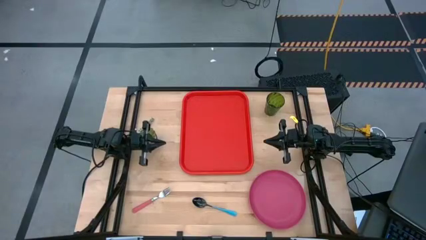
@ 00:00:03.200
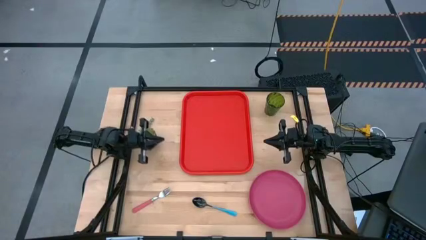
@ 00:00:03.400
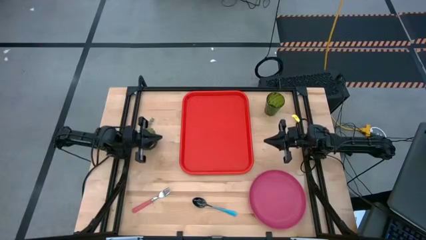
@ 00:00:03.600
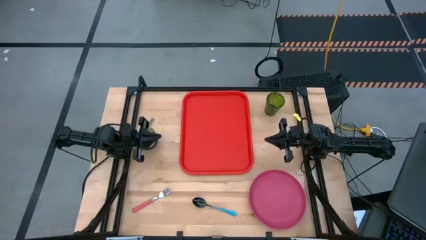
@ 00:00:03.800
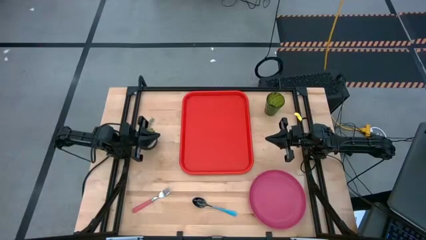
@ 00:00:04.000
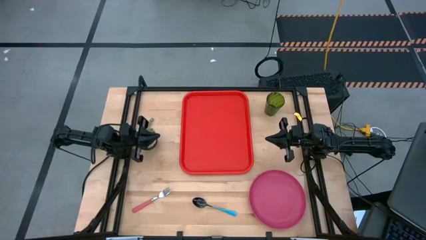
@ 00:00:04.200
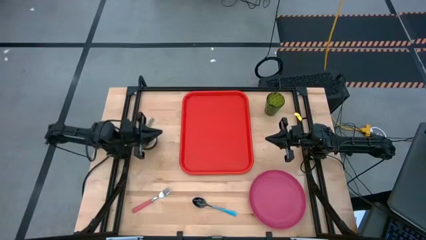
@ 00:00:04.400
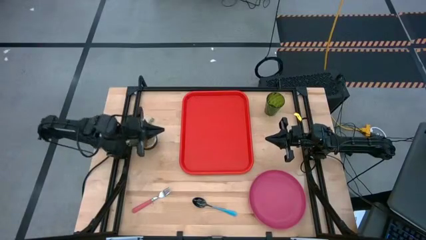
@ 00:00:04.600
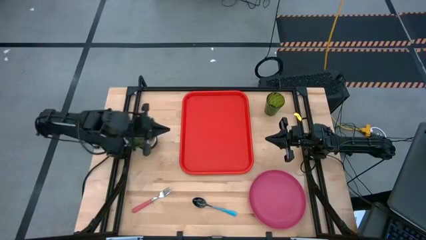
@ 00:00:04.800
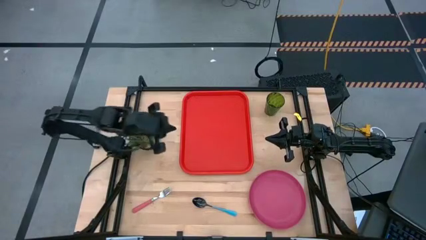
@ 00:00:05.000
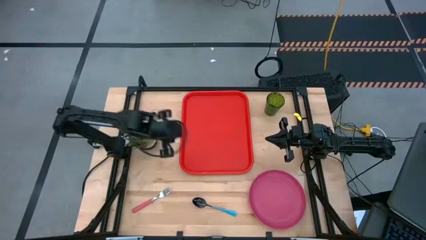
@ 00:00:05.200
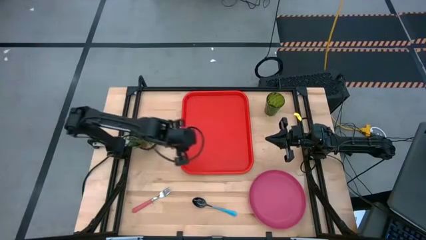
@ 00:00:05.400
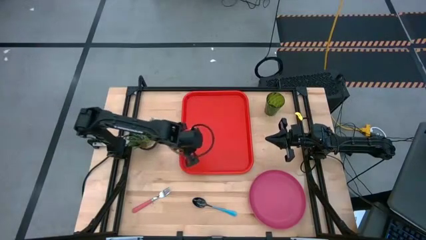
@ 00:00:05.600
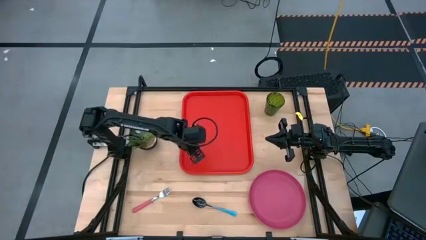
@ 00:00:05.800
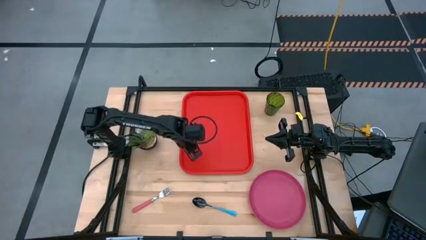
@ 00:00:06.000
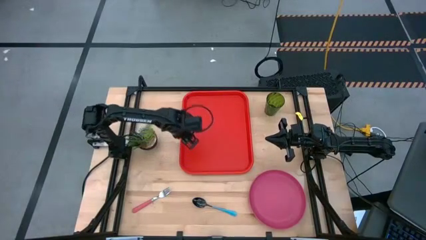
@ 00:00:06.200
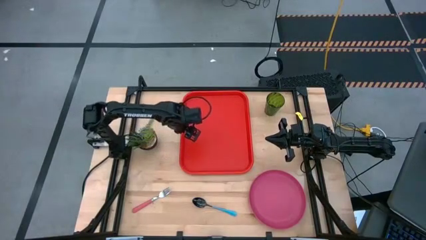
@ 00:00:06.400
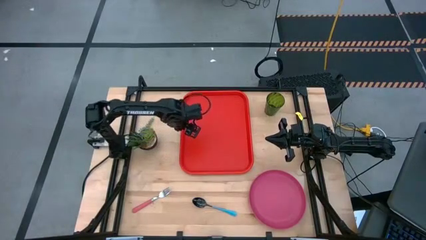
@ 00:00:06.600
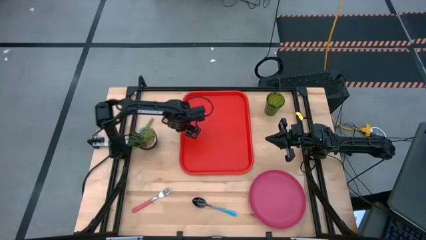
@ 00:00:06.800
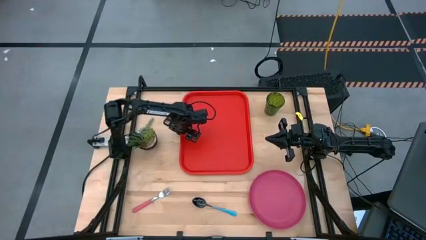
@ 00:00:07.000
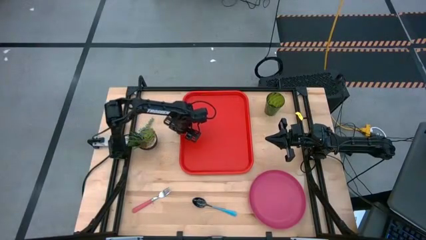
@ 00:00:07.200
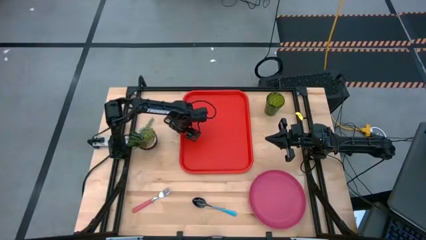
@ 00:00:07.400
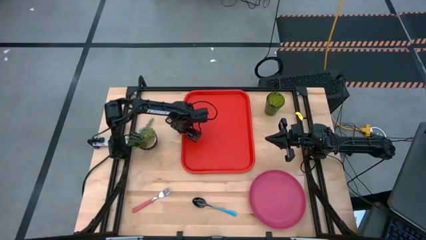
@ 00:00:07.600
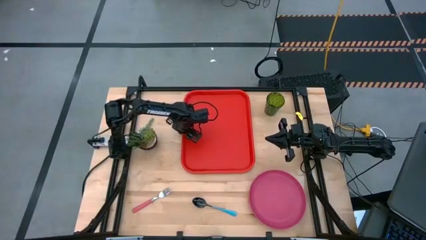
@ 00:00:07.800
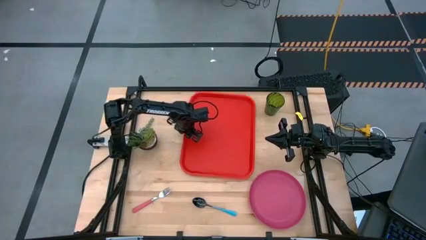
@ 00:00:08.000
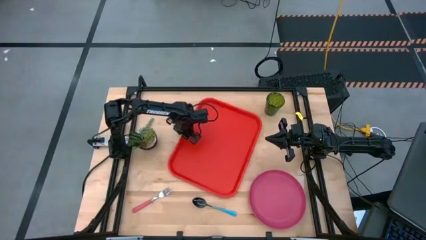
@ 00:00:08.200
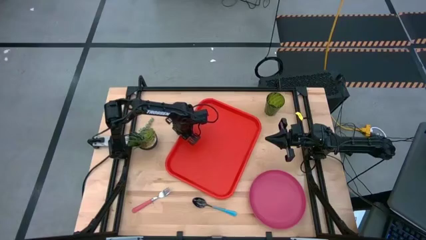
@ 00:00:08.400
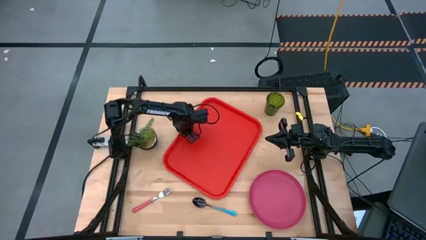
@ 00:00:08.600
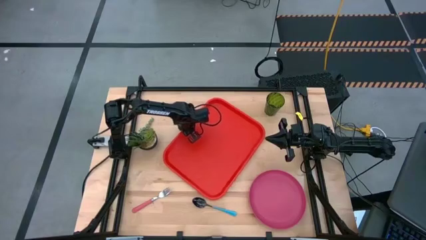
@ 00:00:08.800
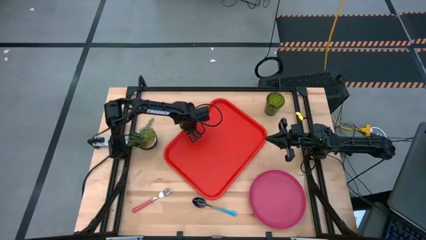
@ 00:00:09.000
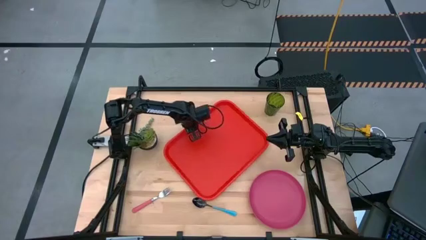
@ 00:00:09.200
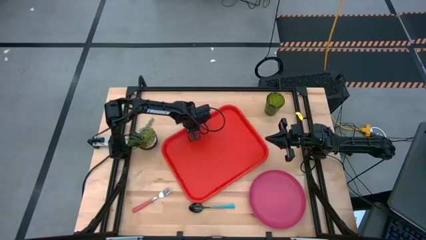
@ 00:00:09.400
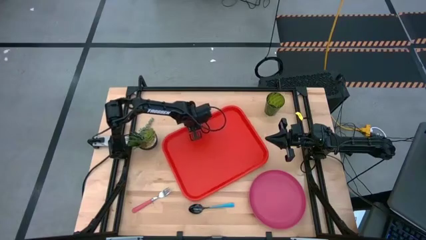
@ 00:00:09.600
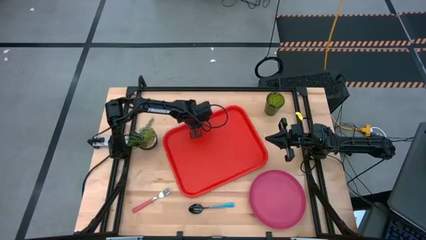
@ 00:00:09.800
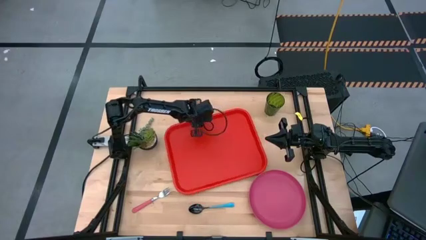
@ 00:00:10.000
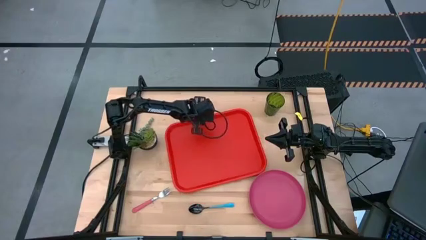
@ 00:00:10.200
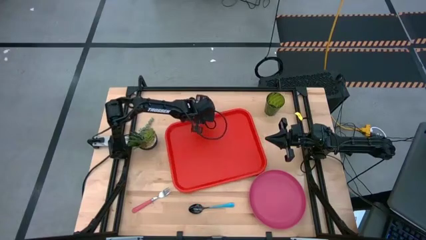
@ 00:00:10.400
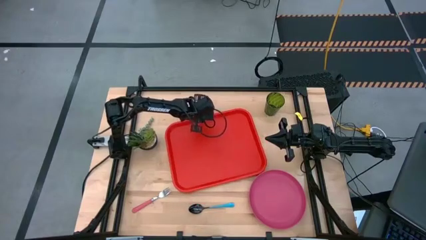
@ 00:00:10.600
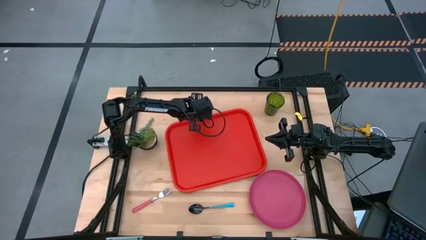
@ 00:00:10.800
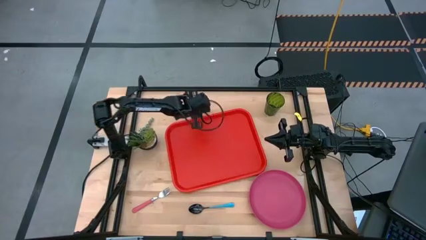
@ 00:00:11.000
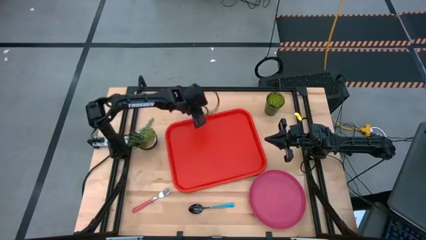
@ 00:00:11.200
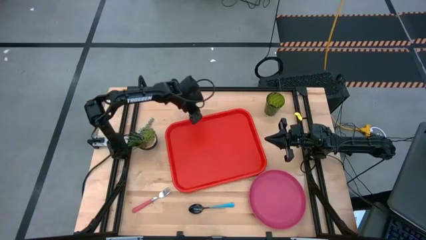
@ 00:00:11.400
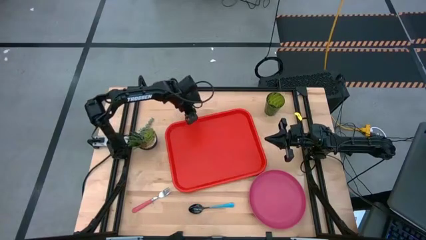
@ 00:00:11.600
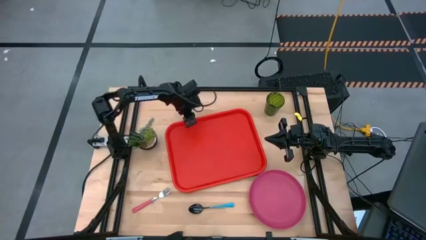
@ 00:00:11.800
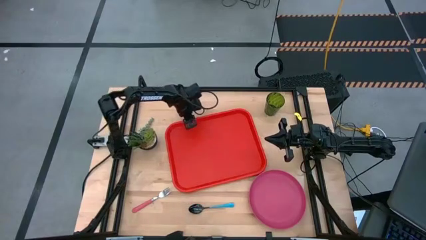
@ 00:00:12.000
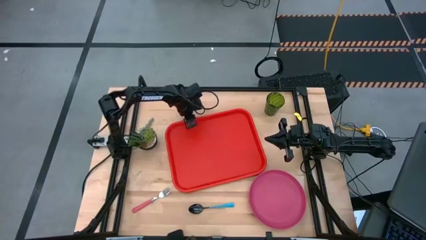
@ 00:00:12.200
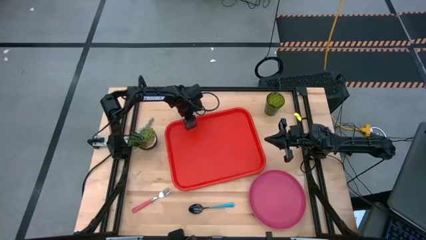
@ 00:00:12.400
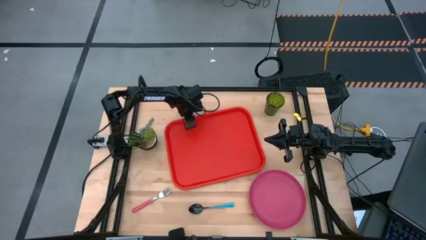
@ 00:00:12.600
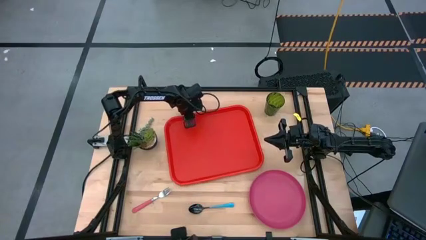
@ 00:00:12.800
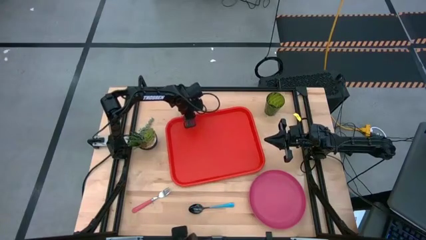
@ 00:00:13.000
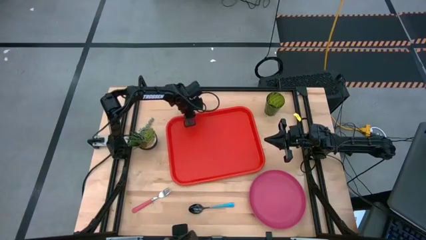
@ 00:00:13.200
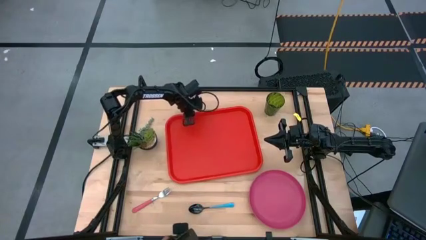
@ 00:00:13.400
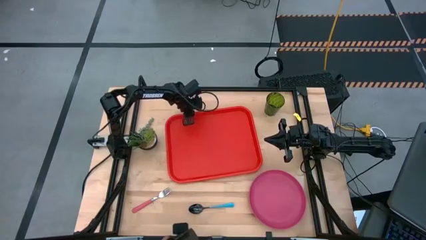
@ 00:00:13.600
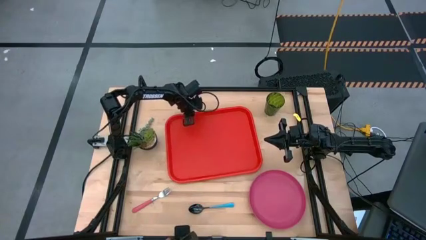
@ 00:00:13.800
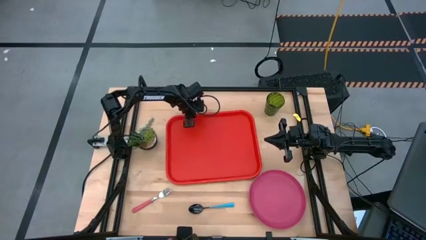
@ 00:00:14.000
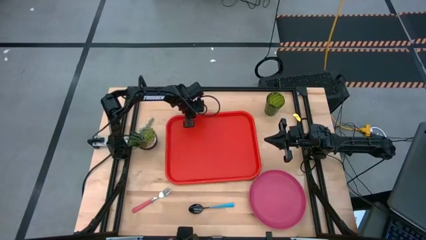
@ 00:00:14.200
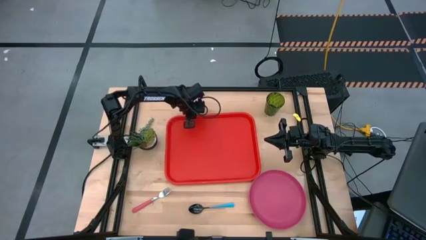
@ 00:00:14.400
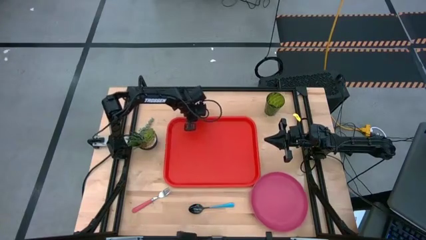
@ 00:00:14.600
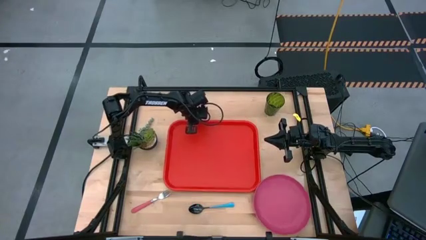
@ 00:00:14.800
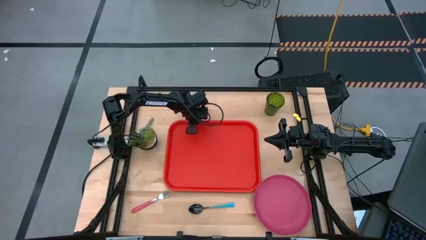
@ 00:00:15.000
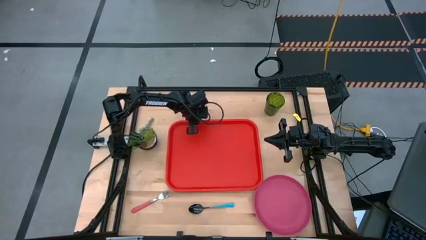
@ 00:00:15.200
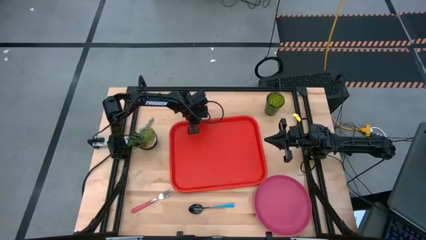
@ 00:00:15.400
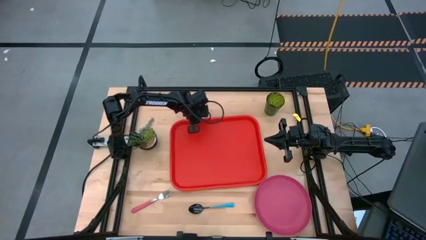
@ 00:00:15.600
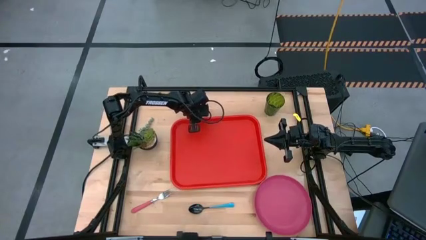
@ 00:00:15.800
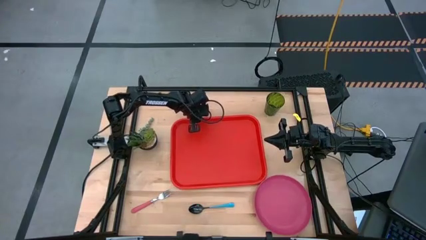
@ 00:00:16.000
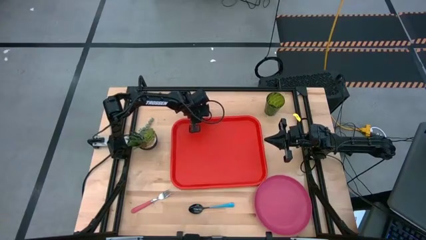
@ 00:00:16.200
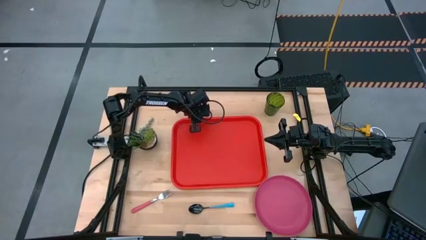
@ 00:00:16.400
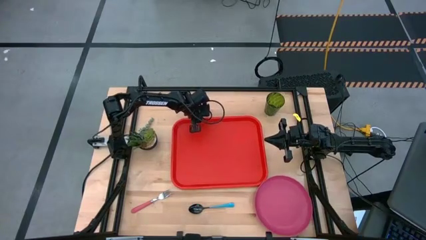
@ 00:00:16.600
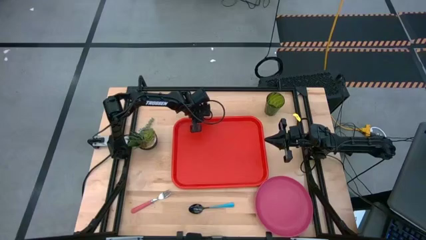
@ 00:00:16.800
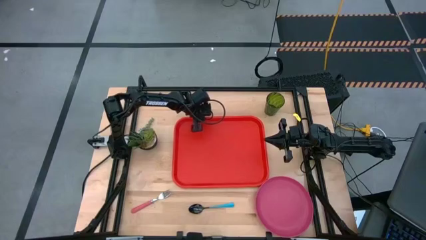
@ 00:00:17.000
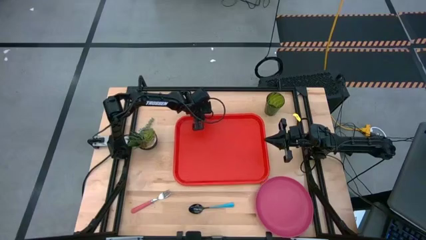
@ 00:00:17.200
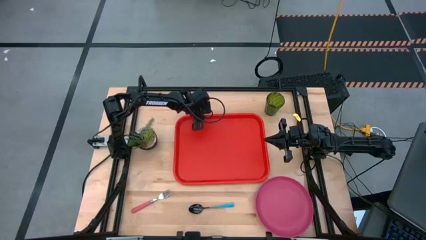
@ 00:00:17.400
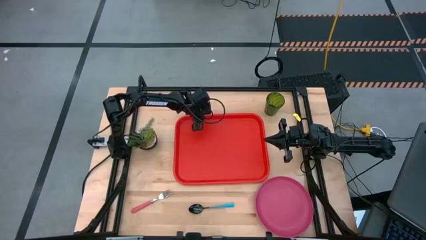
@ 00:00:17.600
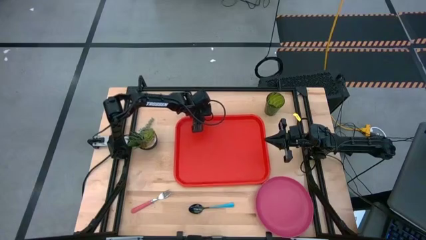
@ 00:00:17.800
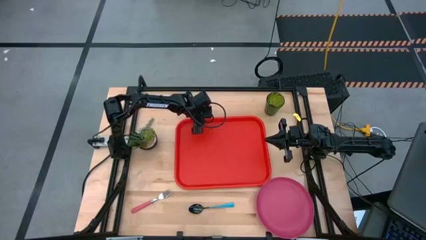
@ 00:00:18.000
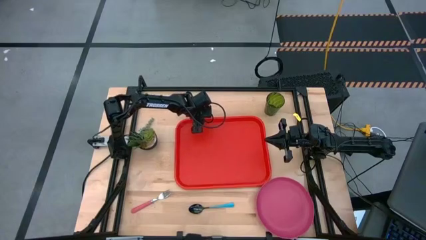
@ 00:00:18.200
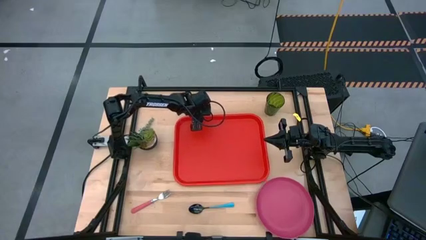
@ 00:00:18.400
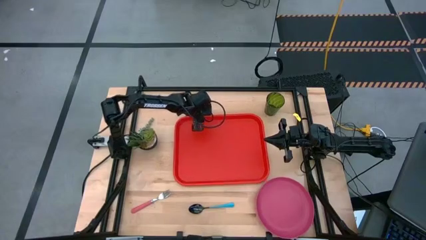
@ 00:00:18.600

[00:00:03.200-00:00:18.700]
Task: Pick and place plate/cup/fork/spoon on tray
Prepare the red tray
